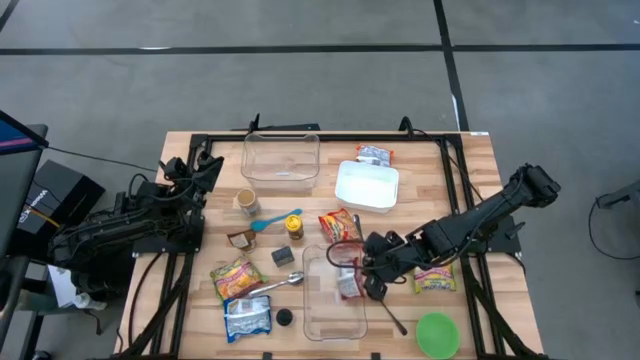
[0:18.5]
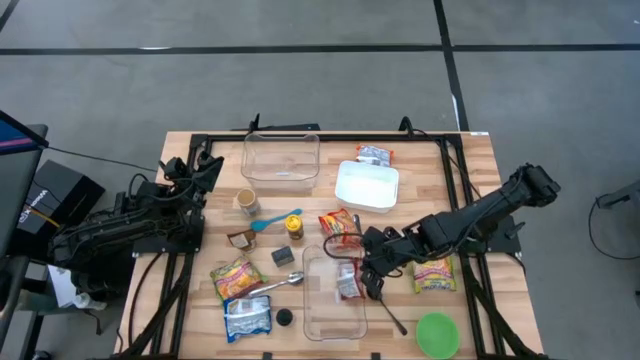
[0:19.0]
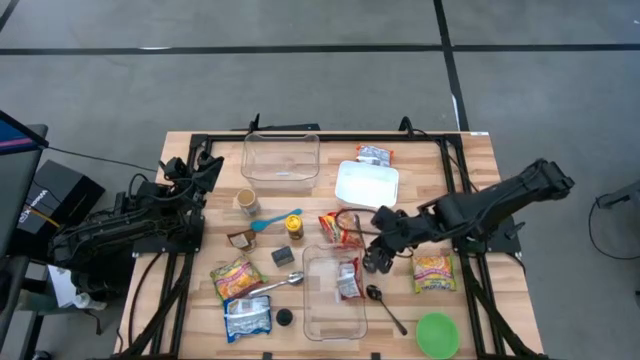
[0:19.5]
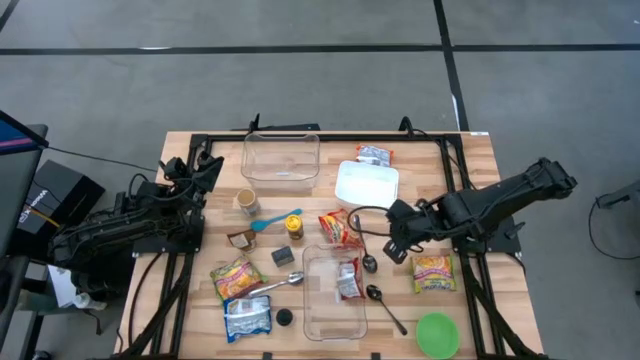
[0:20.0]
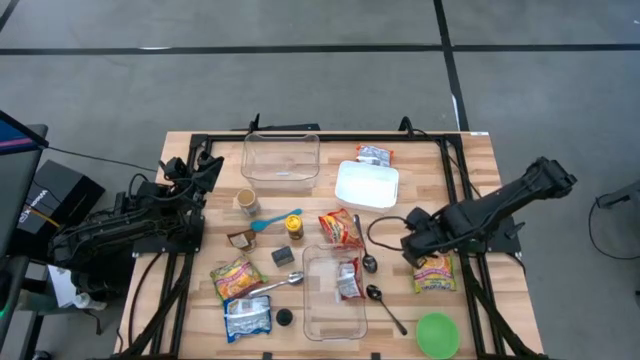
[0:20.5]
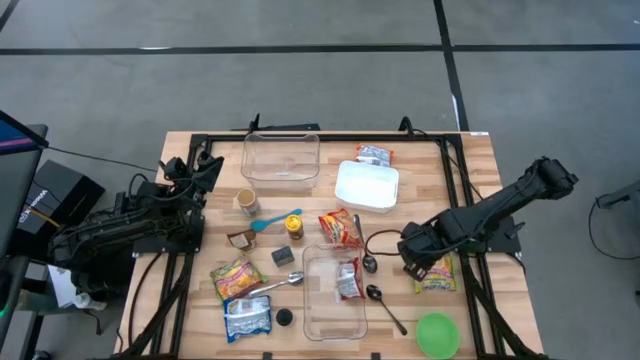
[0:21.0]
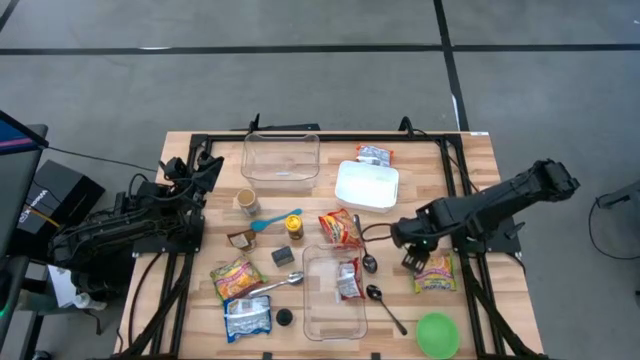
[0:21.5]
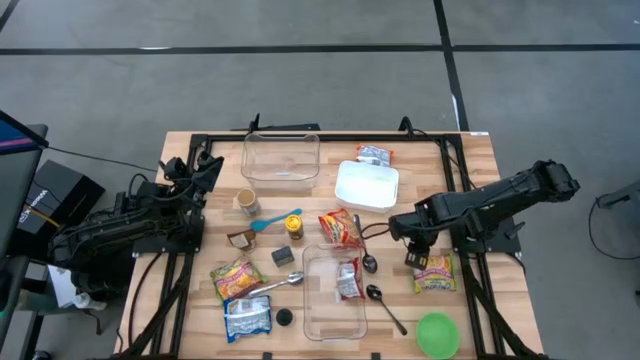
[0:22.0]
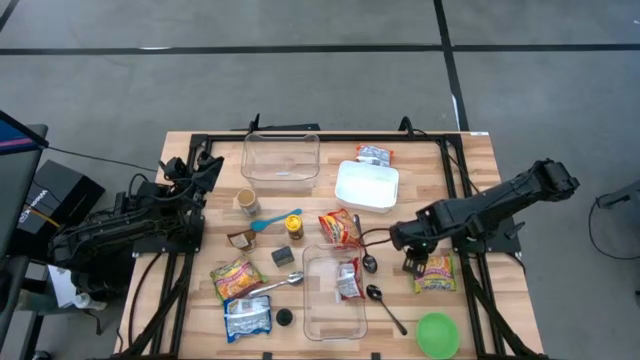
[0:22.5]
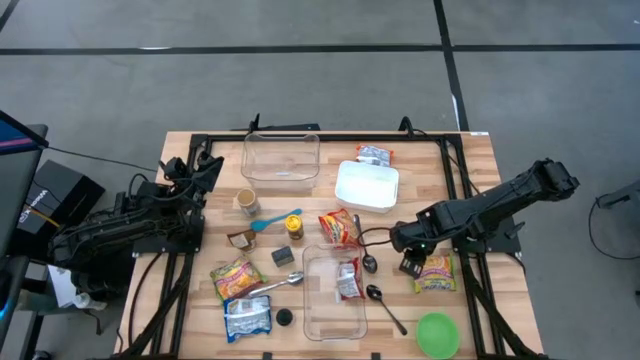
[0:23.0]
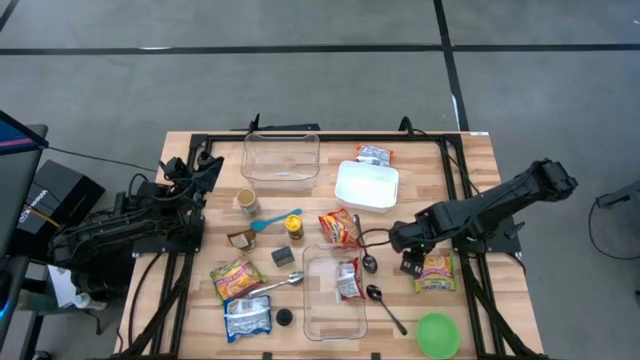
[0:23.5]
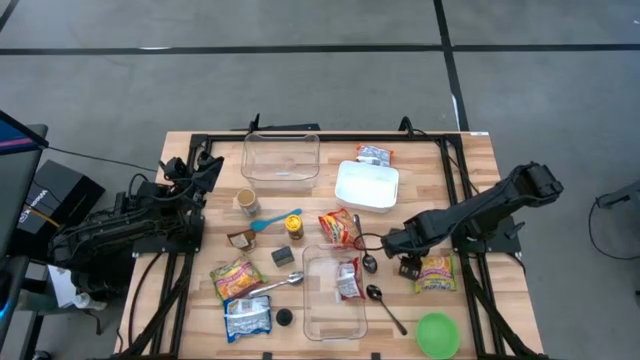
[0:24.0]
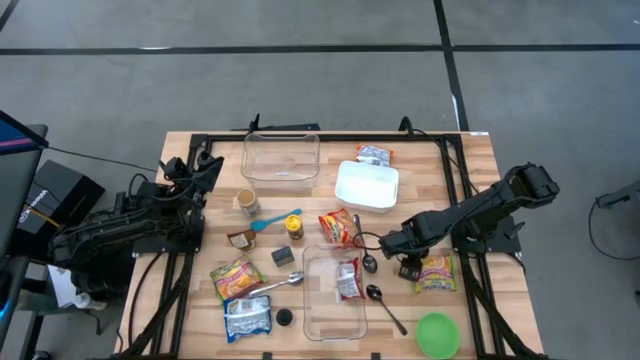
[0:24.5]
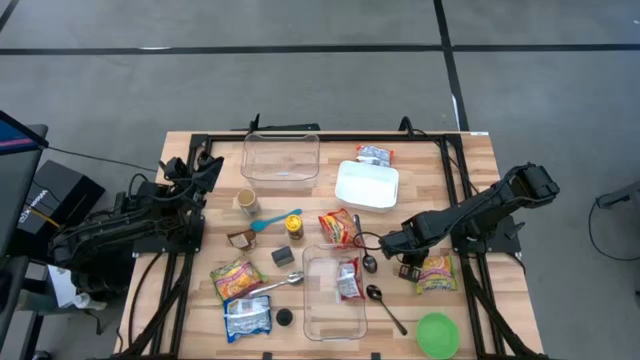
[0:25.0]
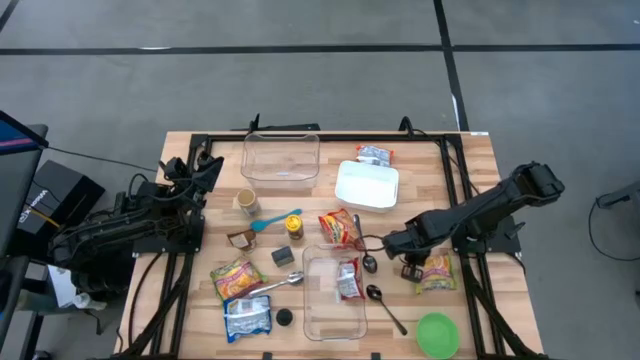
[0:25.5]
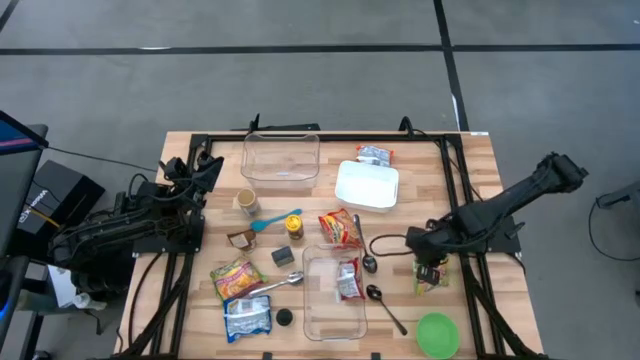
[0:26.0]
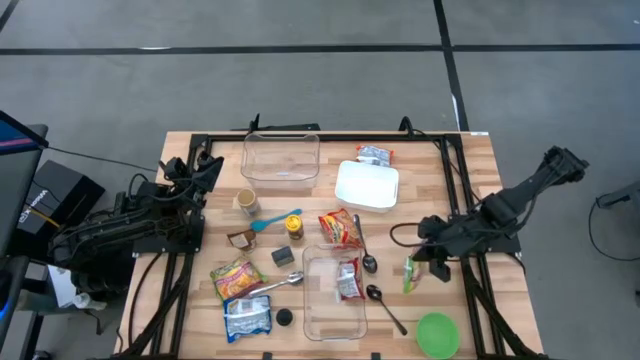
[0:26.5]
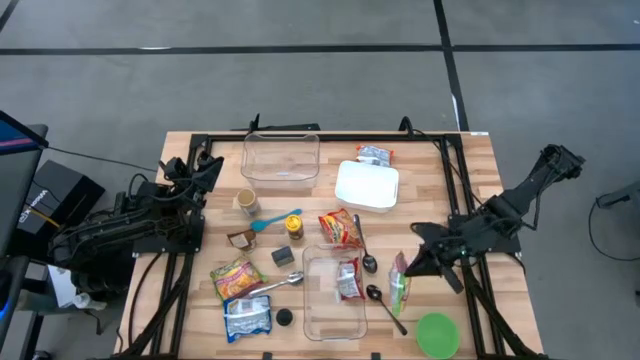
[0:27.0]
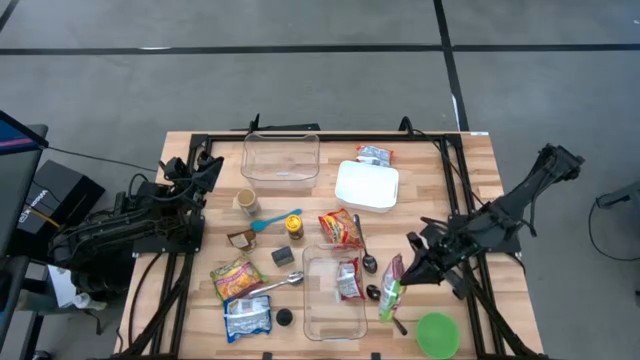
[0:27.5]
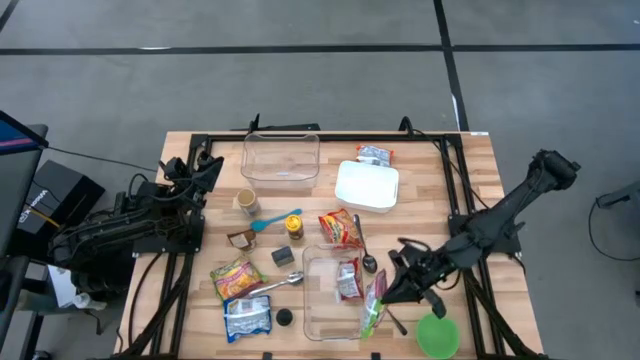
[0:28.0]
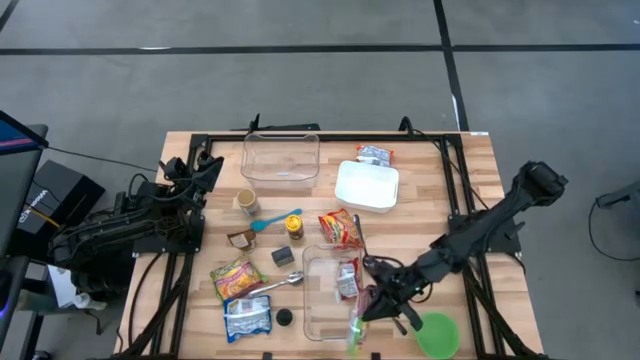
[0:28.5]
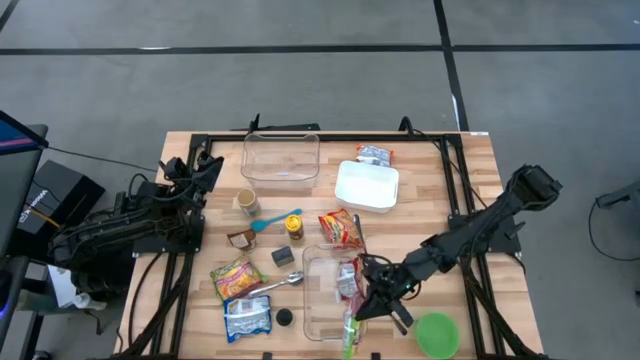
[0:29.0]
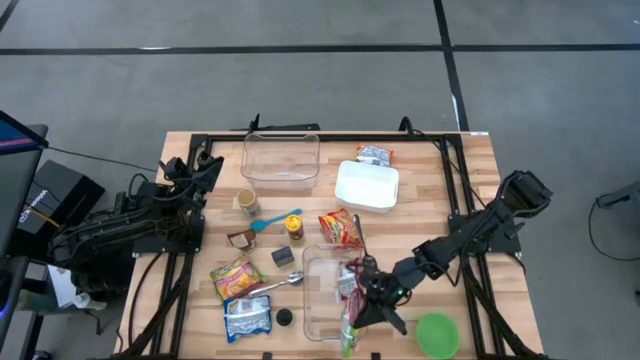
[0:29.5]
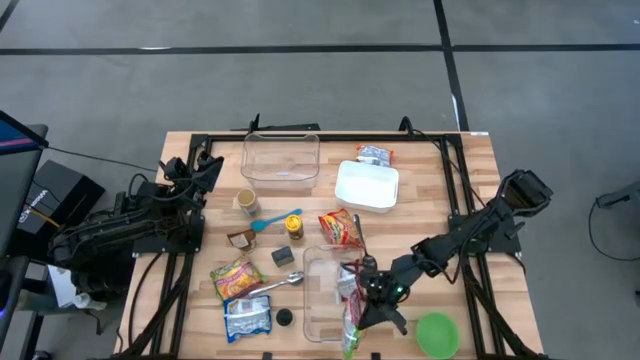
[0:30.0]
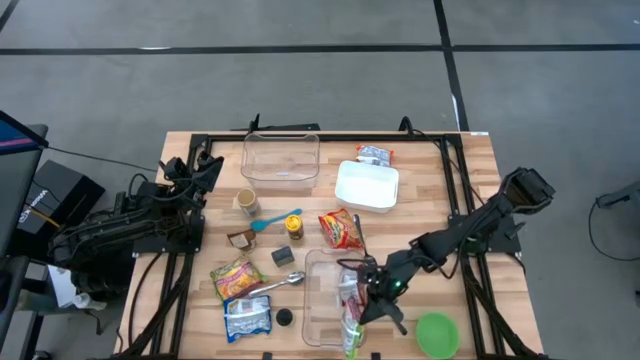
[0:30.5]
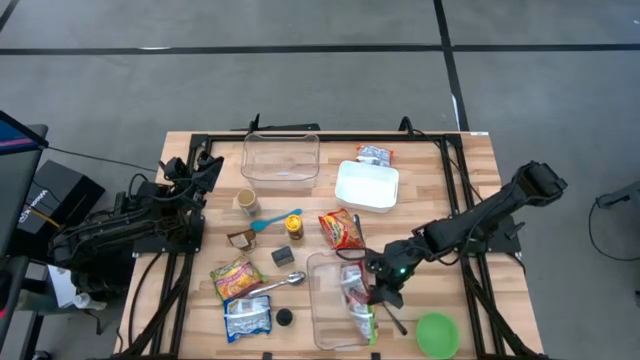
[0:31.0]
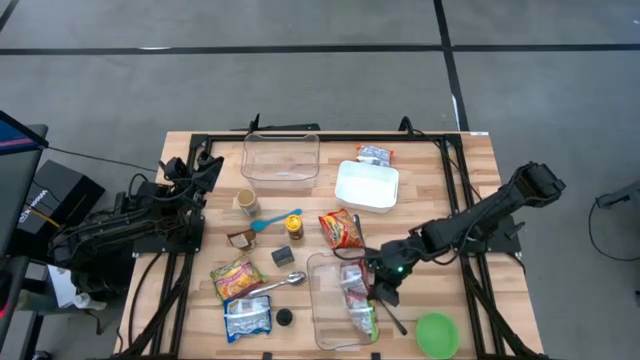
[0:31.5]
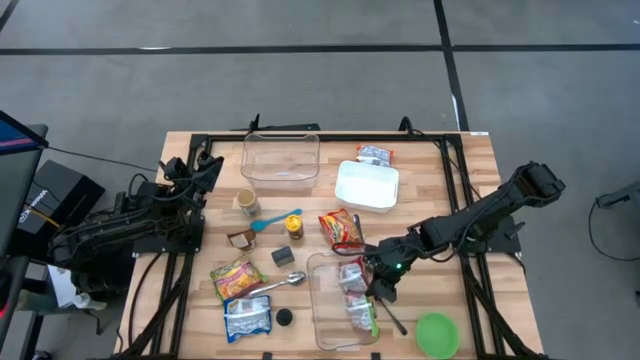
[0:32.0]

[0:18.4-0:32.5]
Task: Pick & Place Food Item
Put the right green noodle pack into the bottom transparent bin

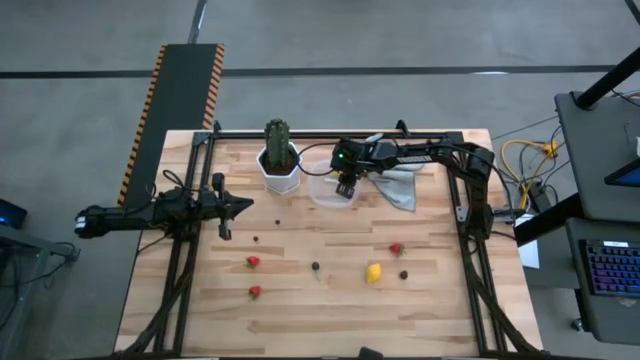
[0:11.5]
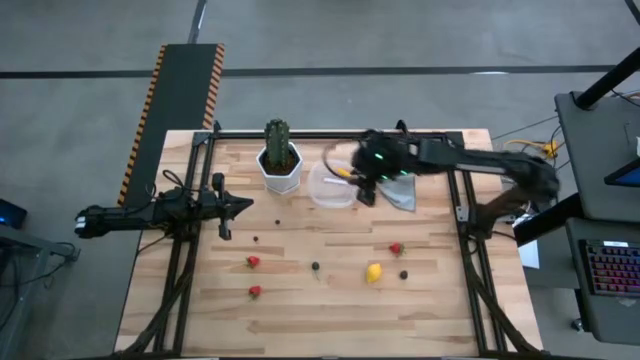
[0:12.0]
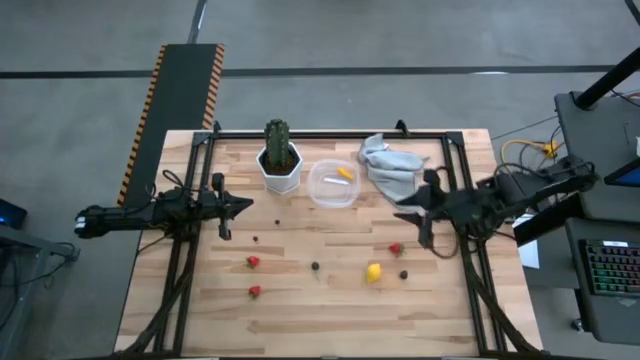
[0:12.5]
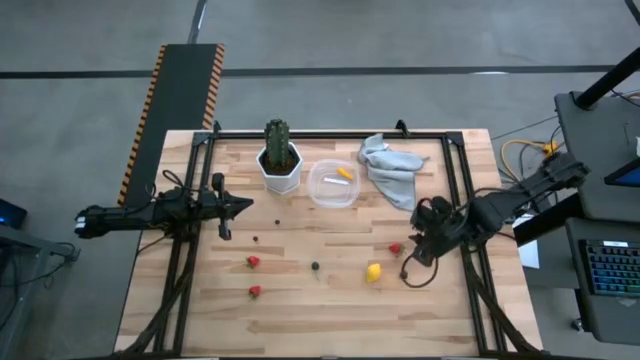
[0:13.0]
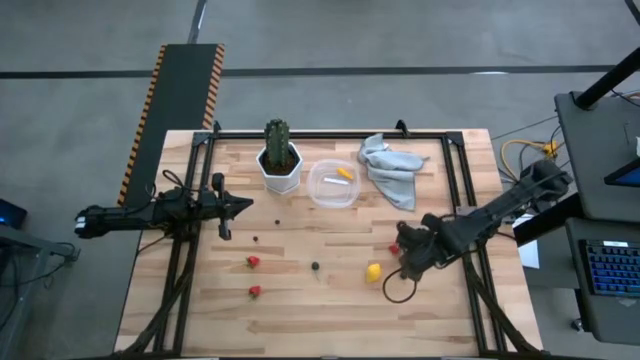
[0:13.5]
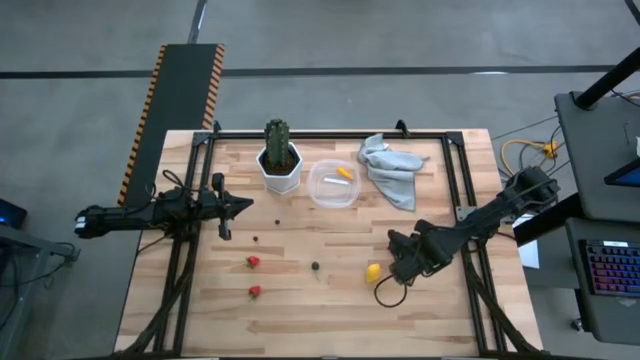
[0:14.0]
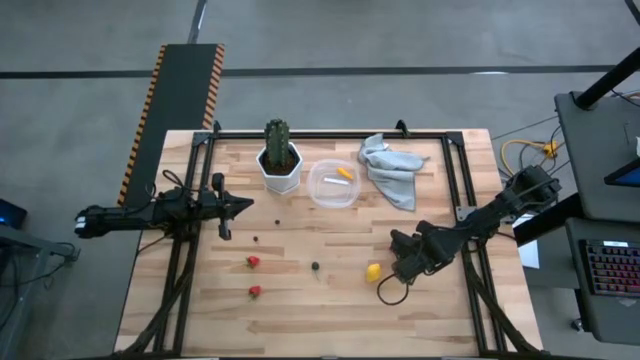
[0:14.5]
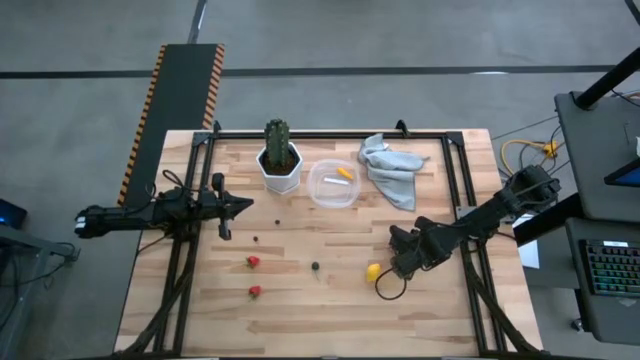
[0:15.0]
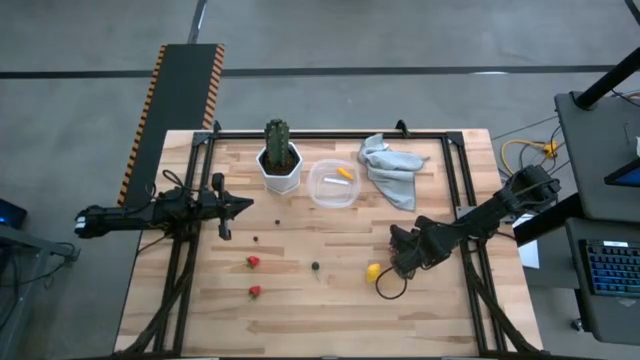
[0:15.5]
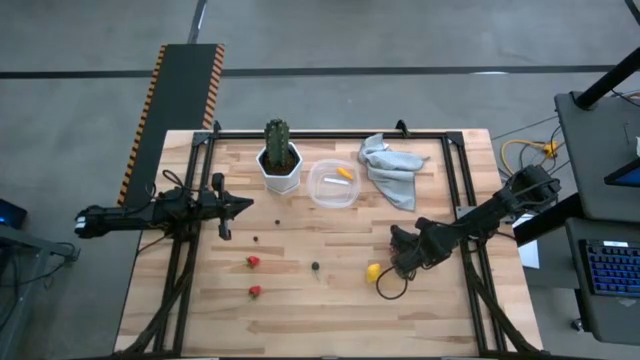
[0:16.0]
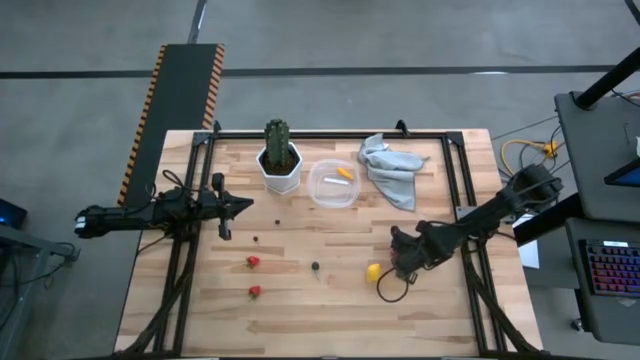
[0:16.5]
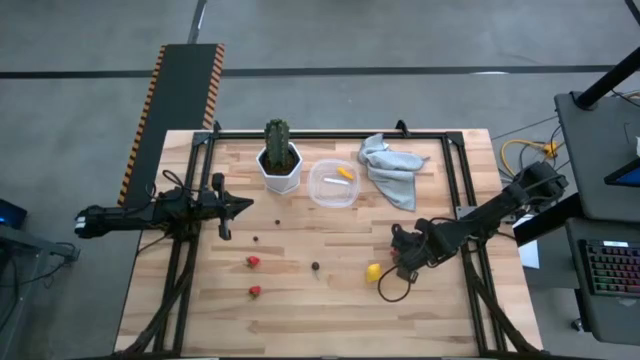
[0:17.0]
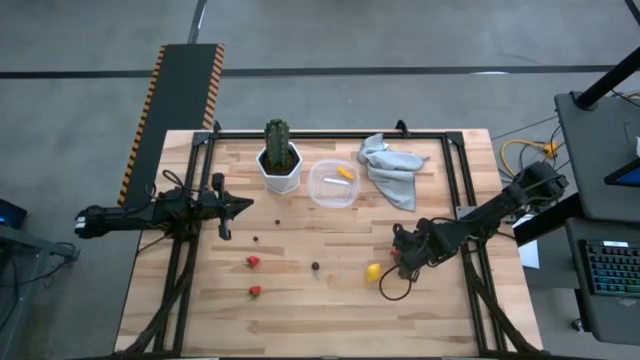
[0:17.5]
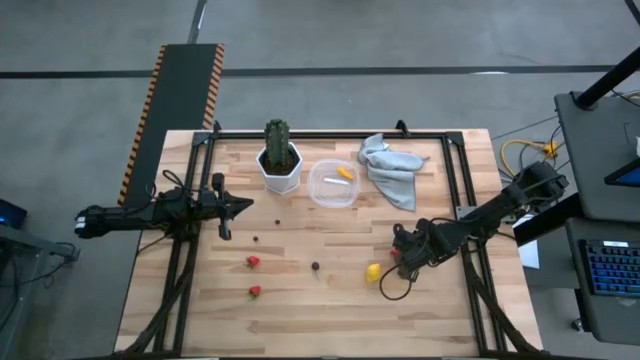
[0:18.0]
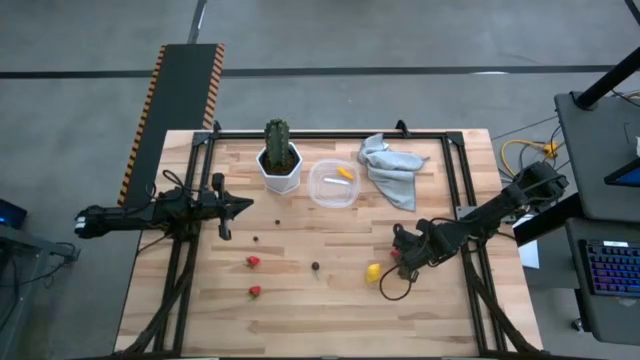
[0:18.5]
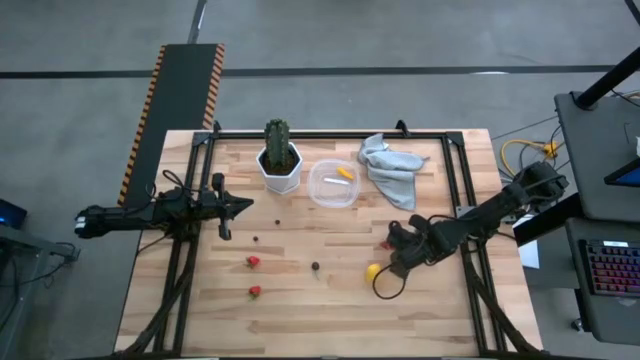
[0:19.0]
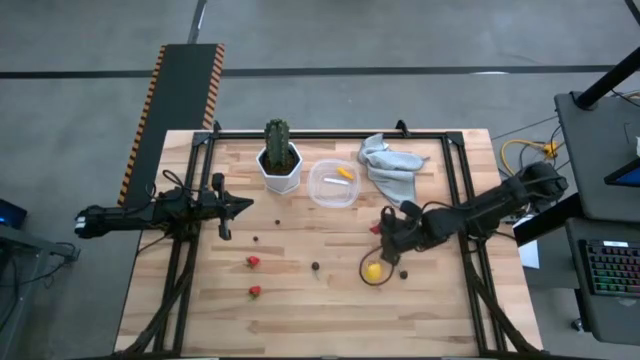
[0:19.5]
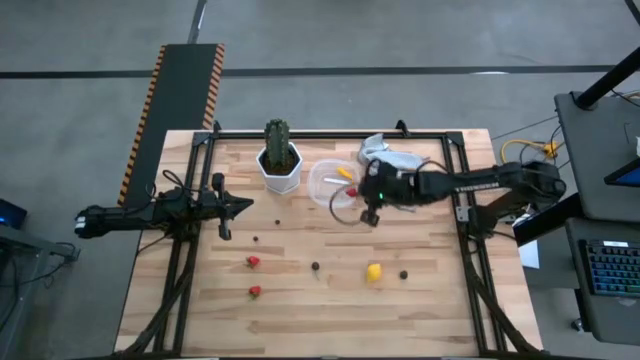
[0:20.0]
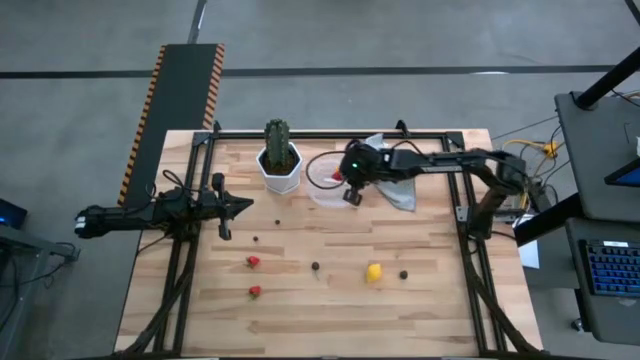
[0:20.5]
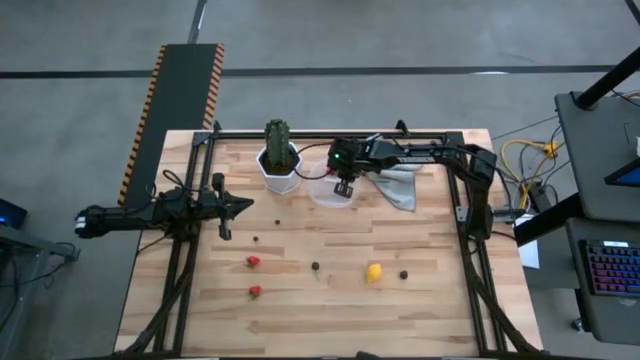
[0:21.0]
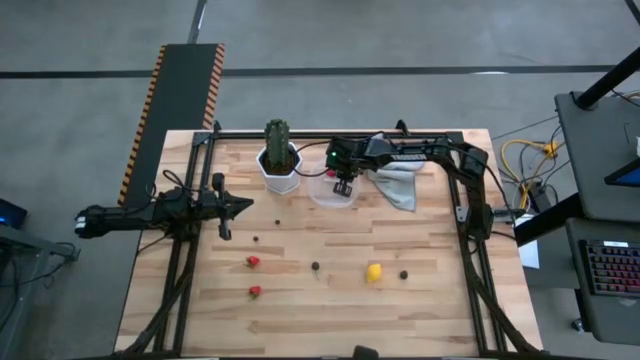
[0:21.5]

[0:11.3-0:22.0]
Task: Pick and placing Produce into tupperware
Put the right red strawberry into the transparent bin
